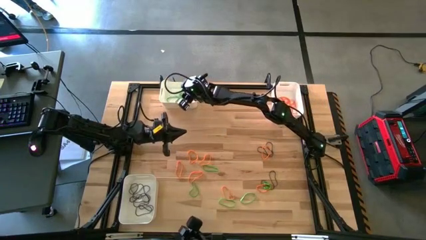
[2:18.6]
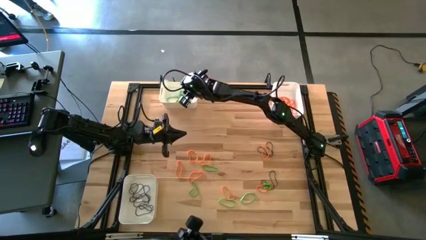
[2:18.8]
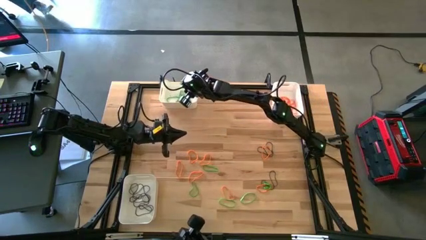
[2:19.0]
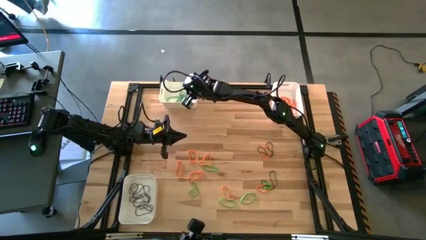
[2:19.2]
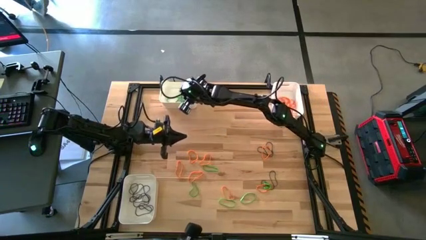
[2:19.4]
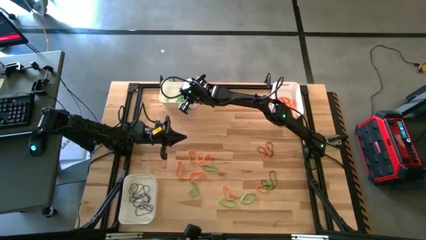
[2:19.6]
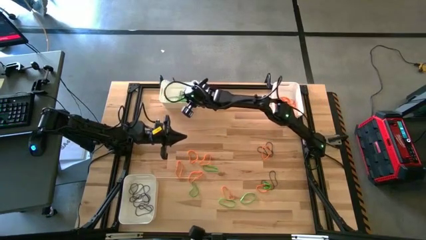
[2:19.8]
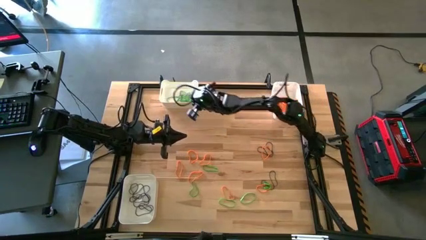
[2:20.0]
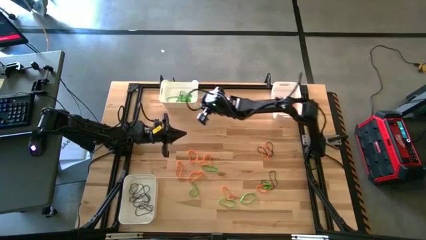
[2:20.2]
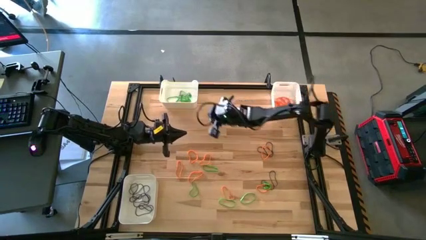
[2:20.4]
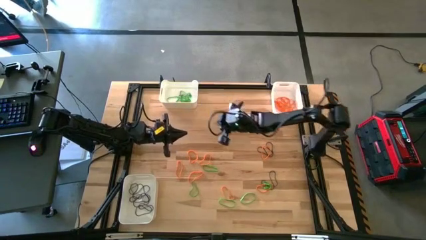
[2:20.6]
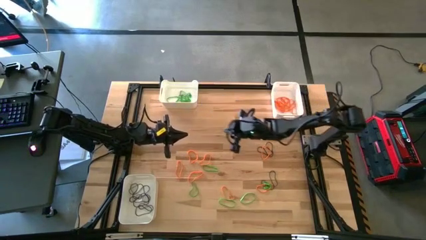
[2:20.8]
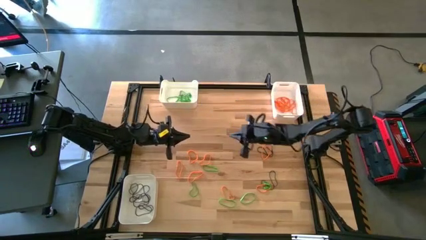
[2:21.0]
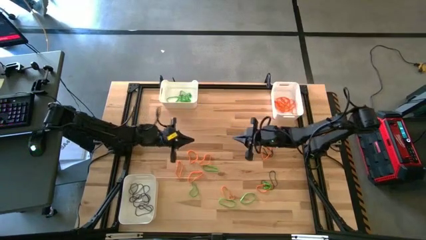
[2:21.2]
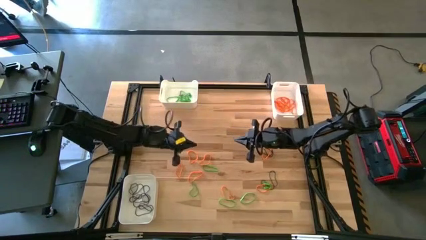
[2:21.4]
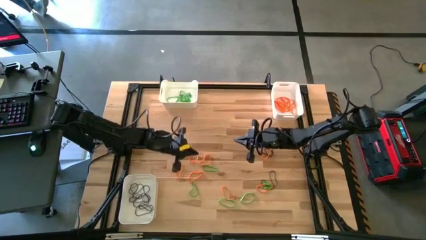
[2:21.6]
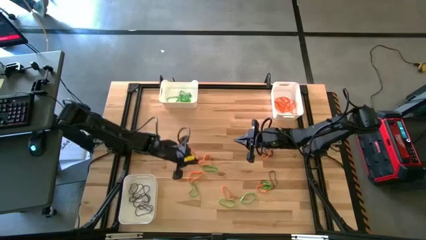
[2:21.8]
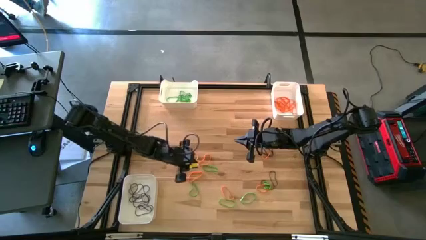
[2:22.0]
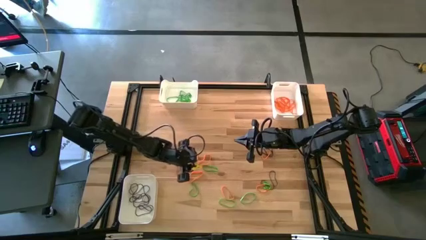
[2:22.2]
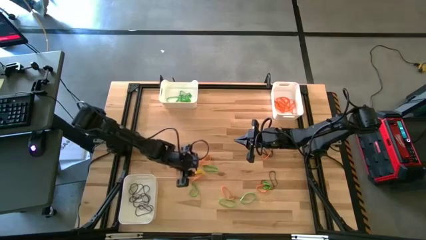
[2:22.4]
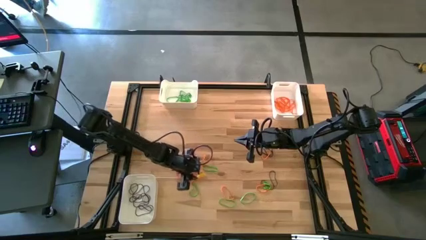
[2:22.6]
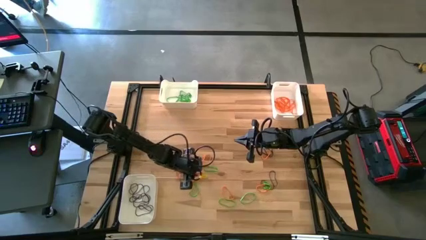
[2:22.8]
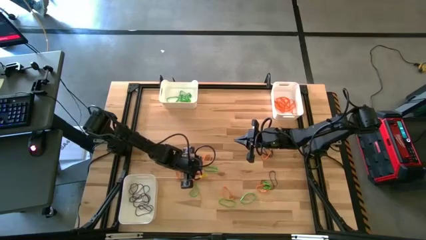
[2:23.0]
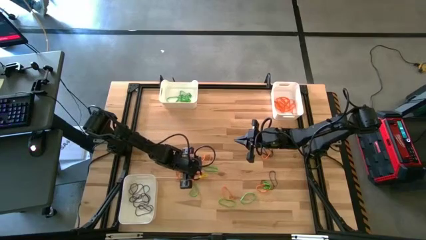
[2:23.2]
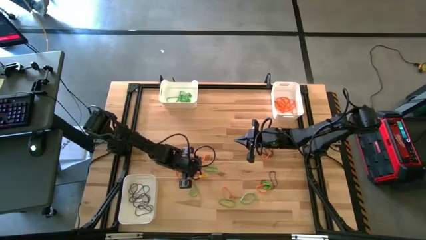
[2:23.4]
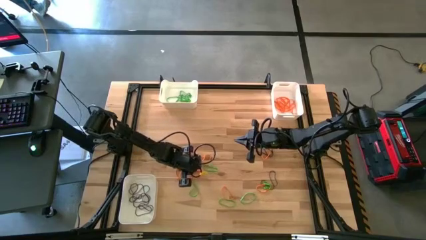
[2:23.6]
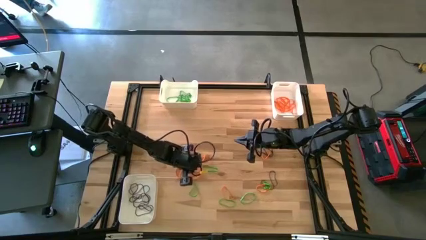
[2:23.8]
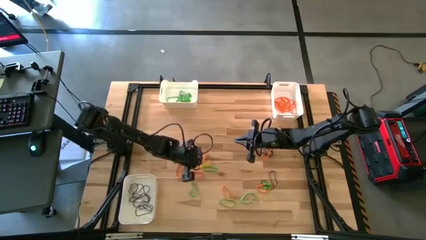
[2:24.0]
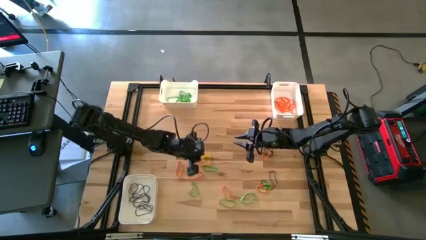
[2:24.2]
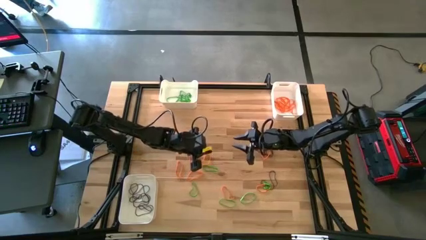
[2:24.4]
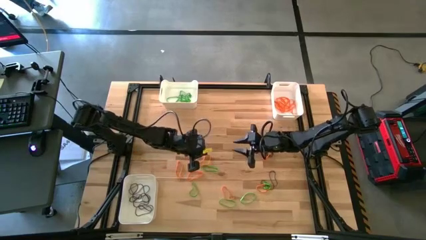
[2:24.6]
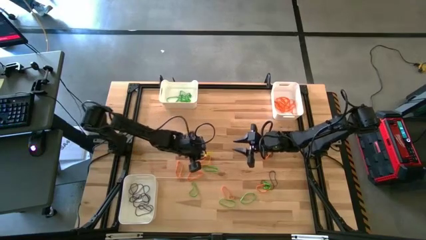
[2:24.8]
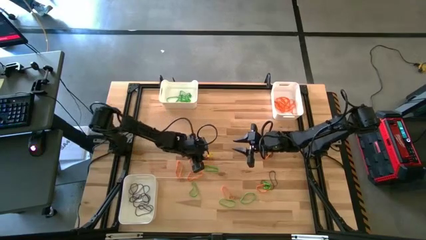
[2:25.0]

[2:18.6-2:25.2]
Task: Sort rubber bands into baskets
Put the orange rubber band into the top right white bin

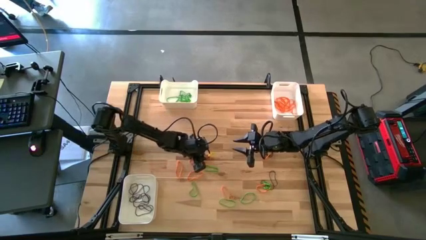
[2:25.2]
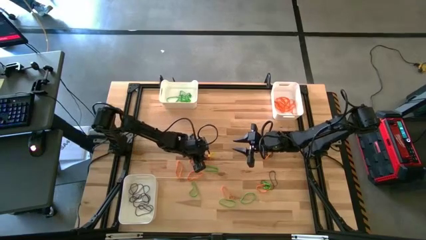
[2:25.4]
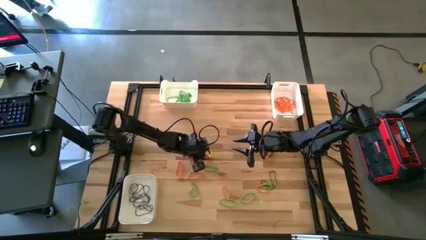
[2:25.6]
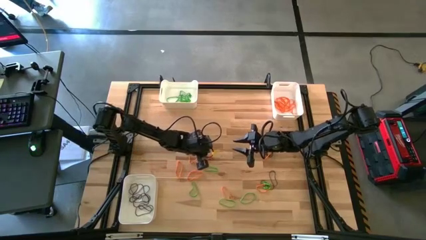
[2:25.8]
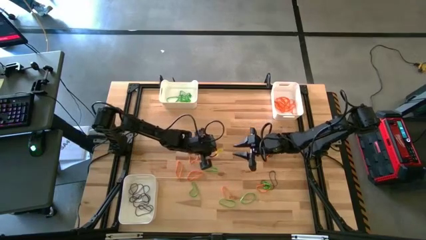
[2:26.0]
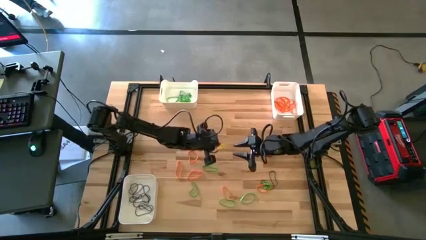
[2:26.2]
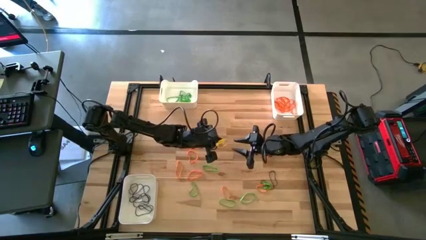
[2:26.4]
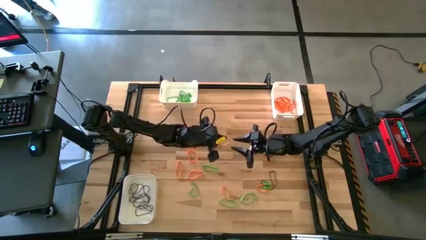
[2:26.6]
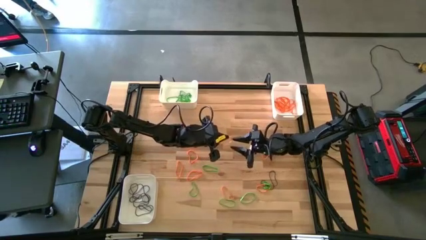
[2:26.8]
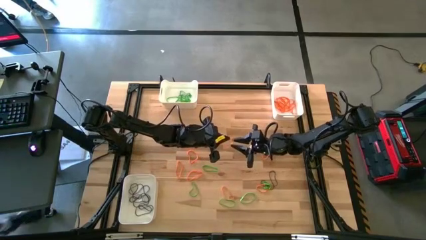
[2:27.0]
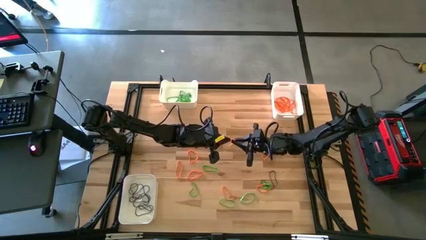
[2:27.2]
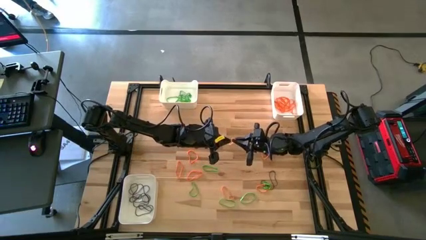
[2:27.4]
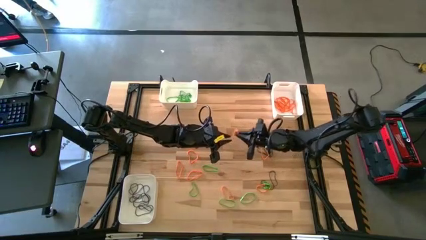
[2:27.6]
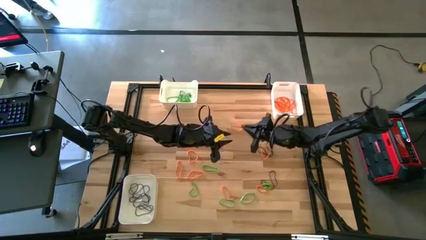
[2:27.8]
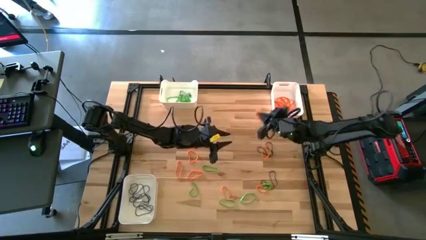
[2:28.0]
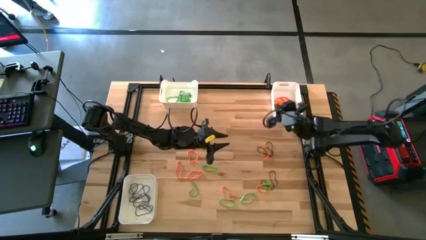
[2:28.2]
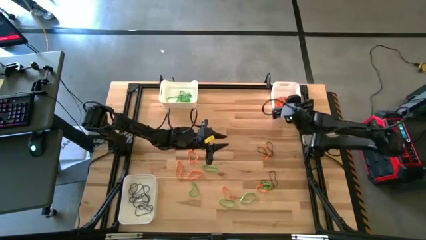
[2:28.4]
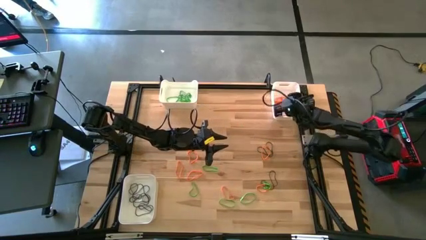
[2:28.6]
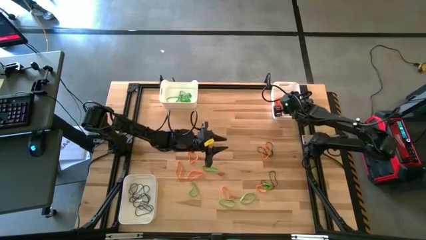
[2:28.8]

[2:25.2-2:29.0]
Put the orange rubber band into the top right white bin

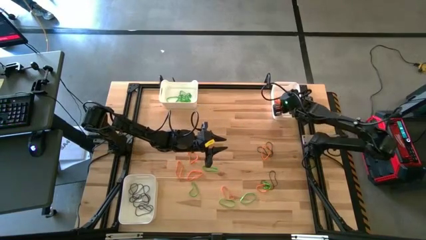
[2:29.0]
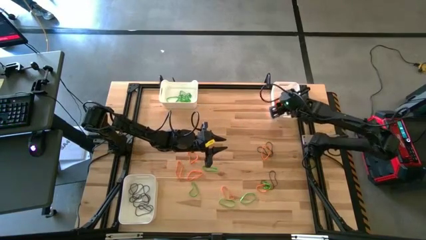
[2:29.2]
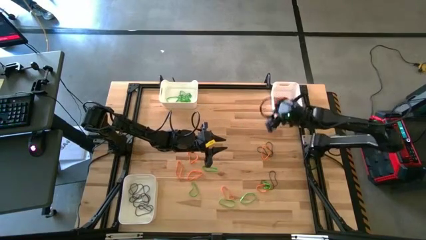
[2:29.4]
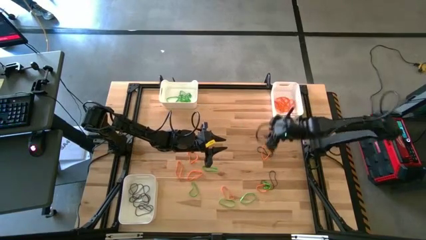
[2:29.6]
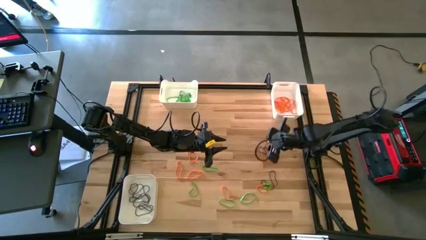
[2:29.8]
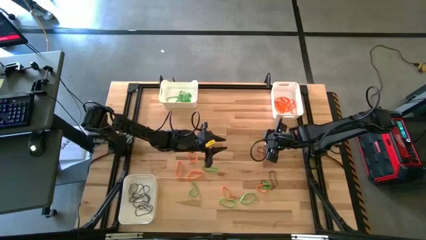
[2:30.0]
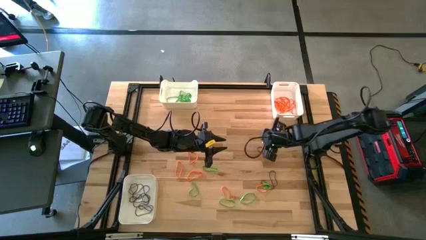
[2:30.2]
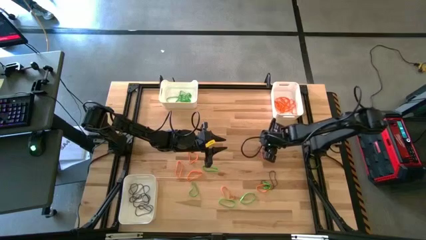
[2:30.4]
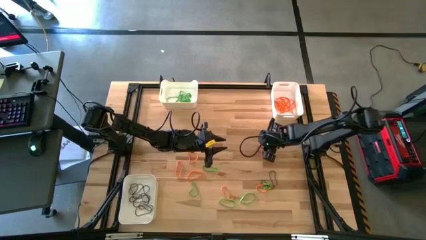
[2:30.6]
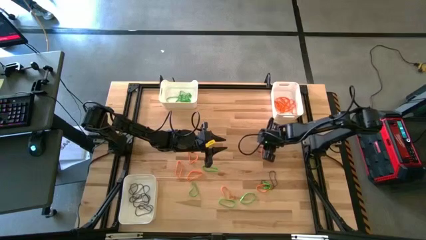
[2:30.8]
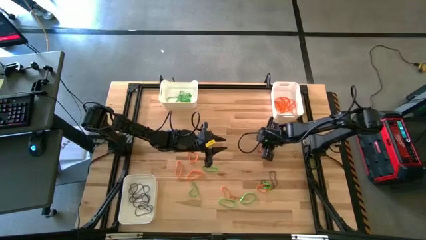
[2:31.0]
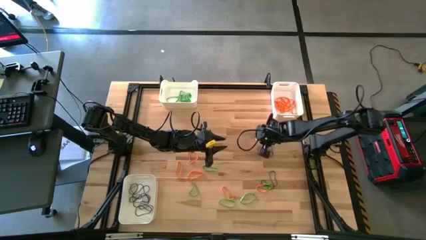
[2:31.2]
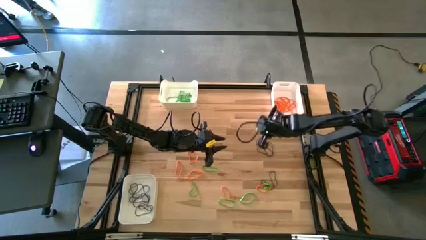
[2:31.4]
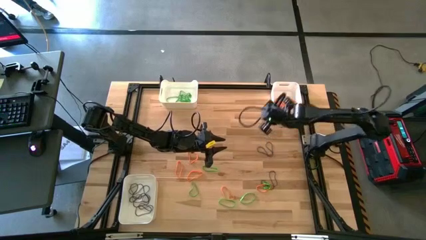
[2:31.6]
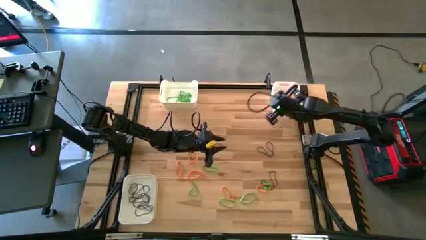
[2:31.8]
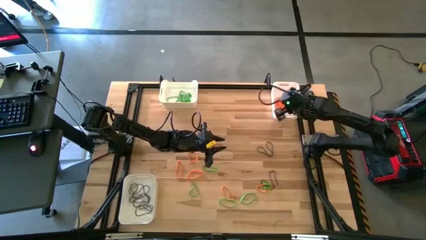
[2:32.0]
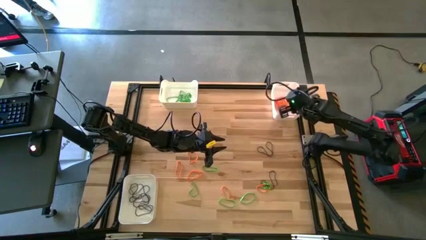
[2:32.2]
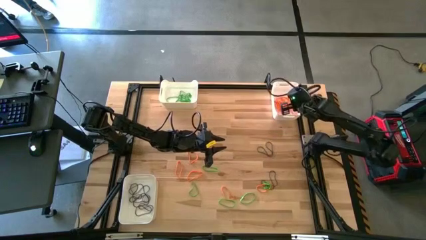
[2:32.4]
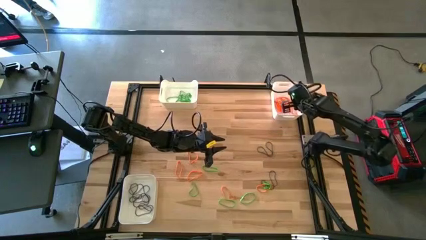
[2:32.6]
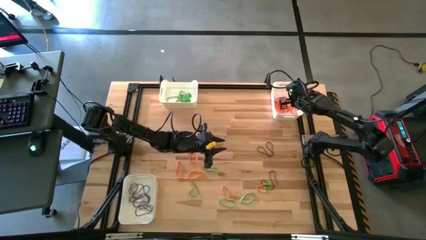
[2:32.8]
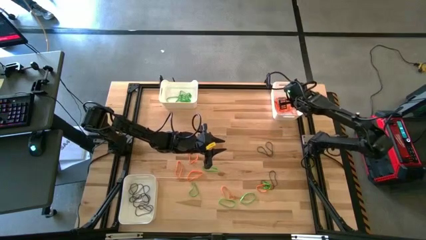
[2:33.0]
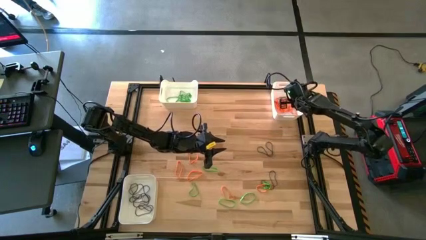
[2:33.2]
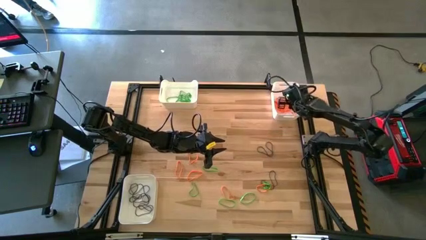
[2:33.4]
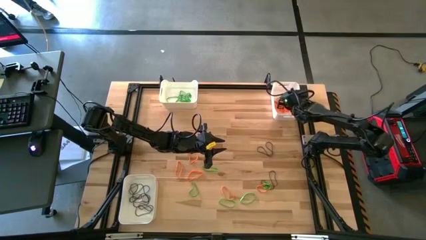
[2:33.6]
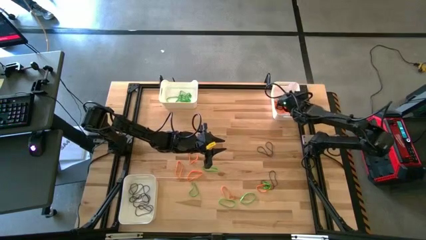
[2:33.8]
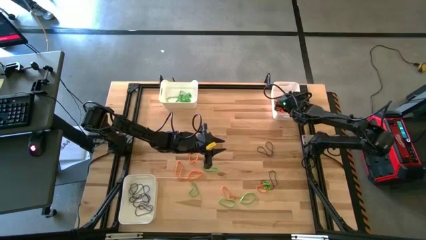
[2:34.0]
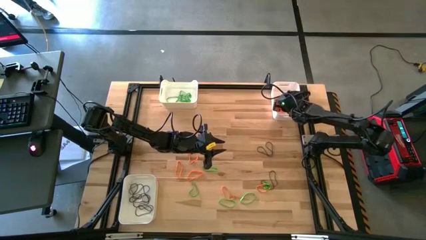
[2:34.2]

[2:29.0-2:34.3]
Put the orange rubber band into the top right white bin

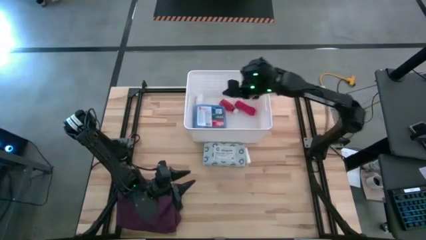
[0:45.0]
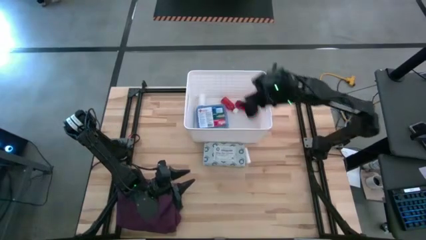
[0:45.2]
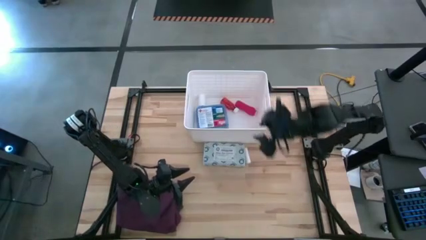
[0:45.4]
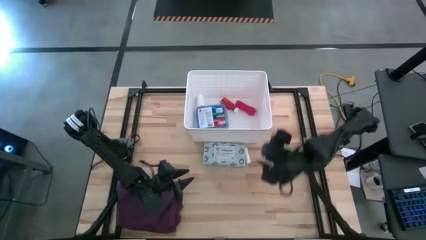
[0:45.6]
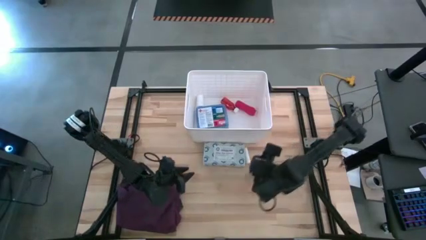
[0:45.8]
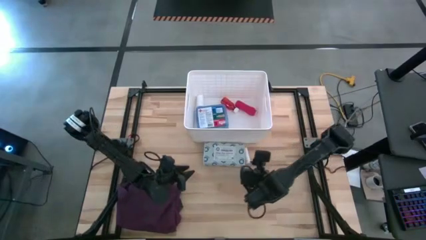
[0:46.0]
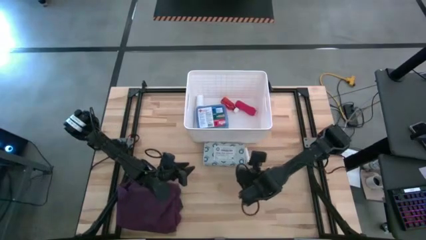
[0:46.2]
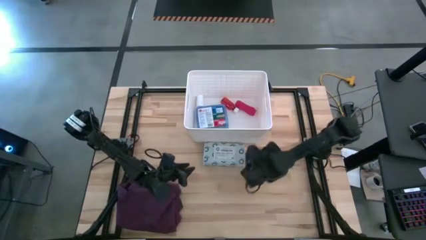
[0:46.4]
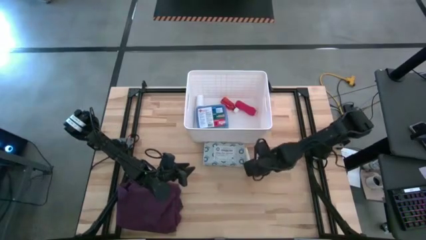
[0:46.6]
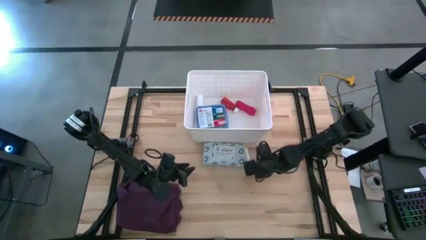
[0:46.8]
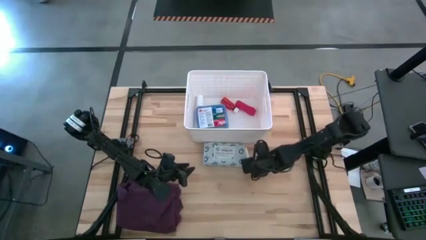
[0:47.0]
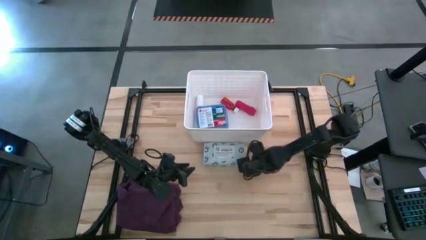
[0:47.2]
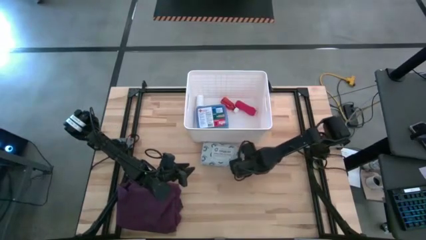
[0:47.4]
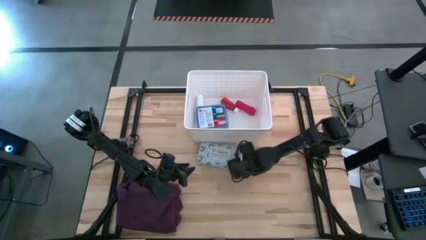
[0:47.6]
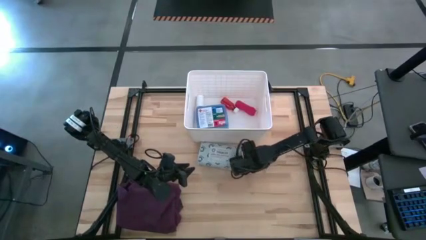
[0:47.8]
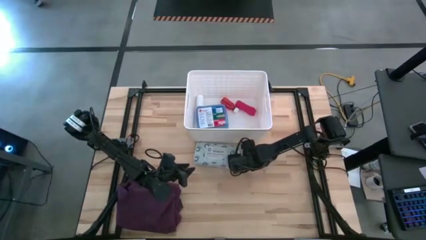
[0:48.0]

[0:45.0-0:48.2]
Task: Pick & place medical supplies in basket/bin
Put the white rolled gauze into the white bin
